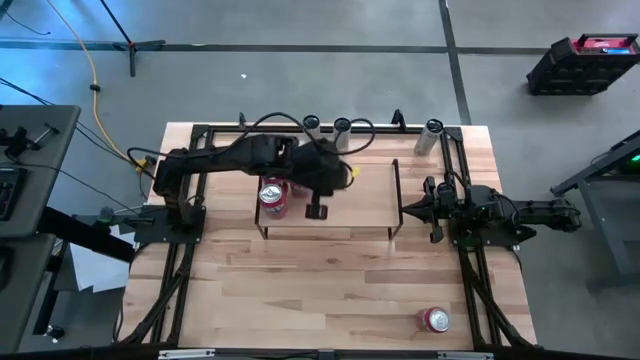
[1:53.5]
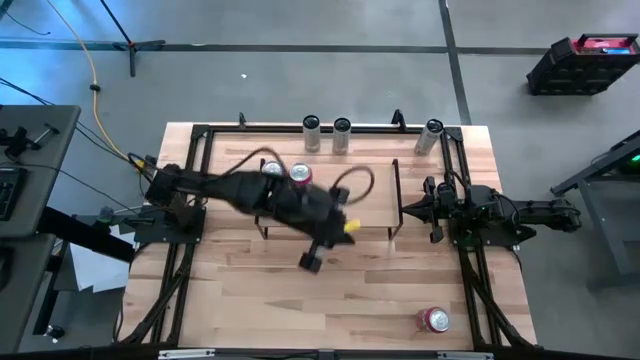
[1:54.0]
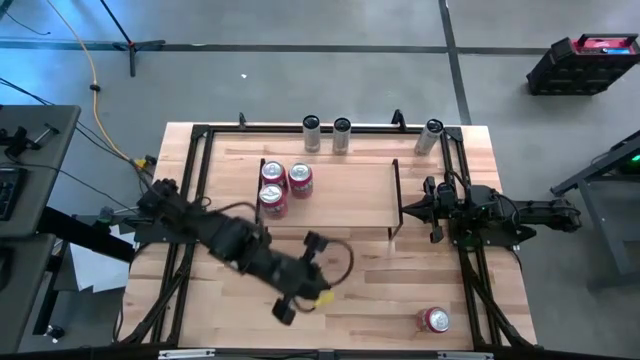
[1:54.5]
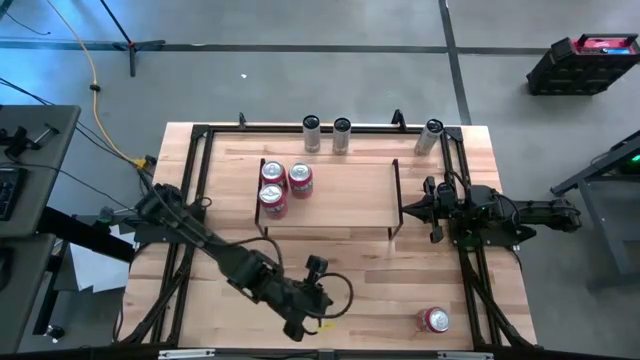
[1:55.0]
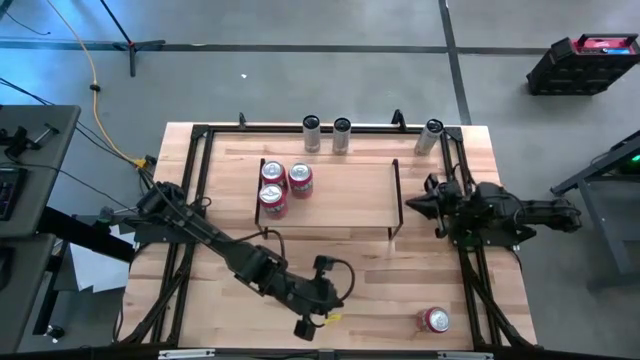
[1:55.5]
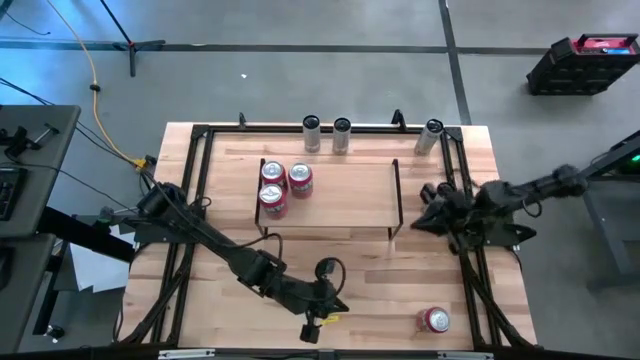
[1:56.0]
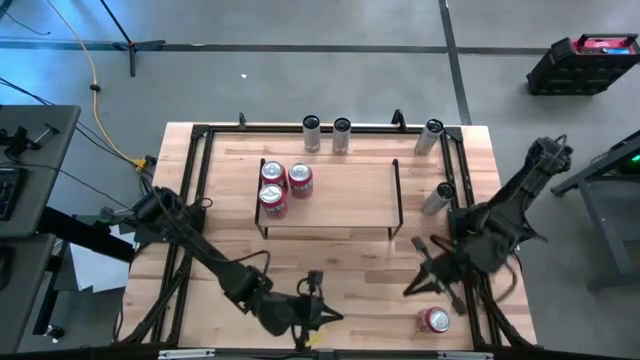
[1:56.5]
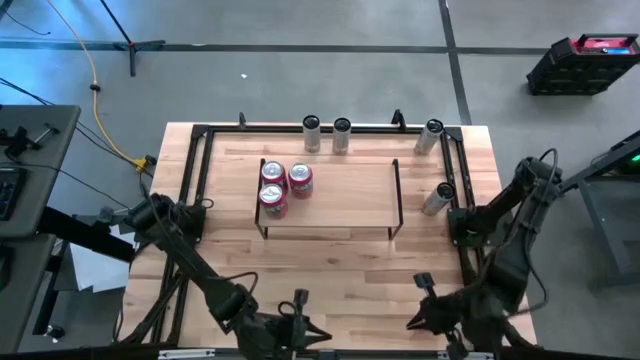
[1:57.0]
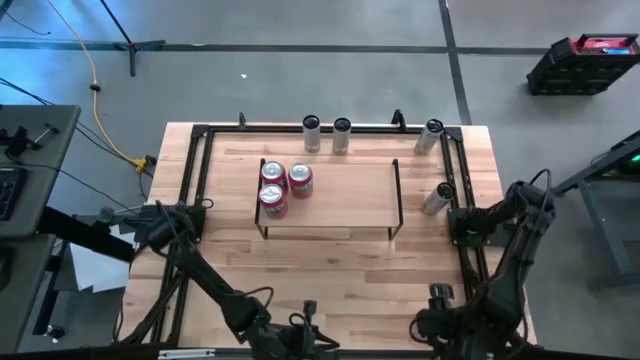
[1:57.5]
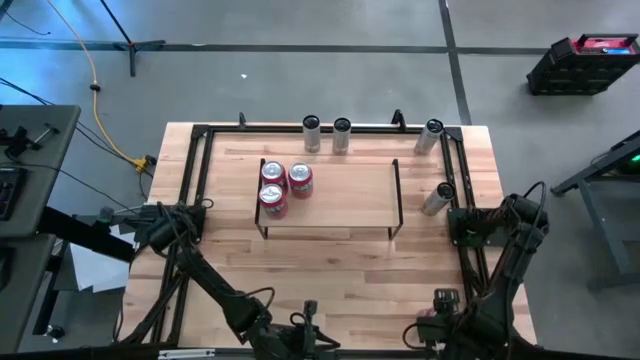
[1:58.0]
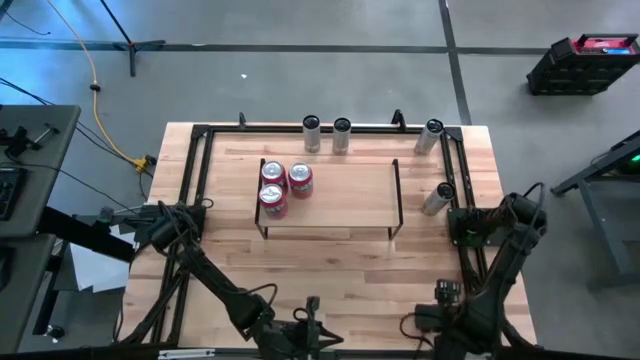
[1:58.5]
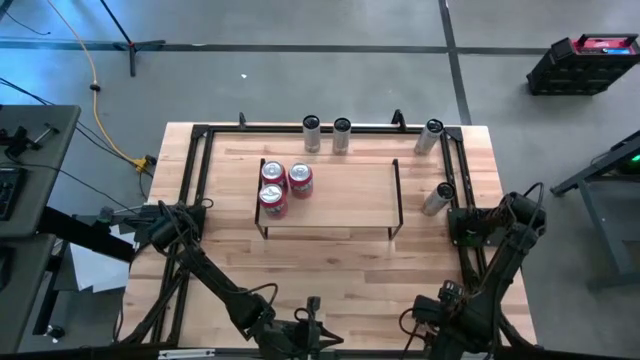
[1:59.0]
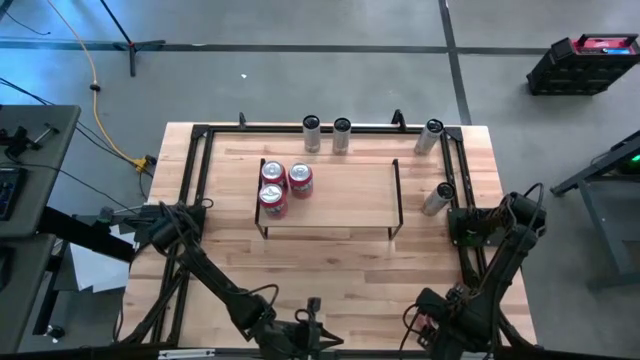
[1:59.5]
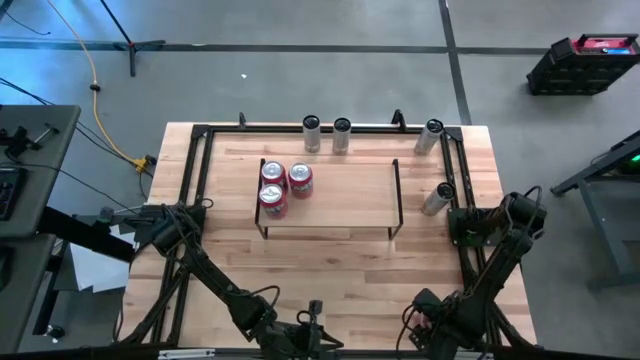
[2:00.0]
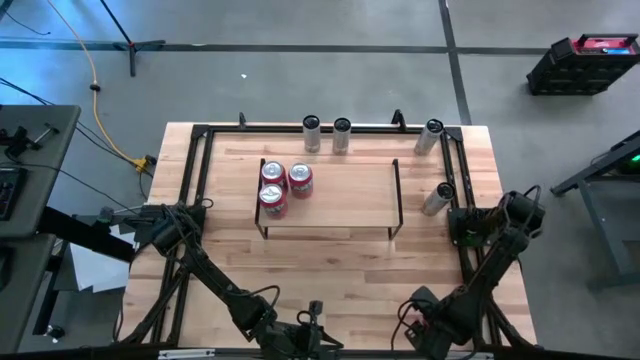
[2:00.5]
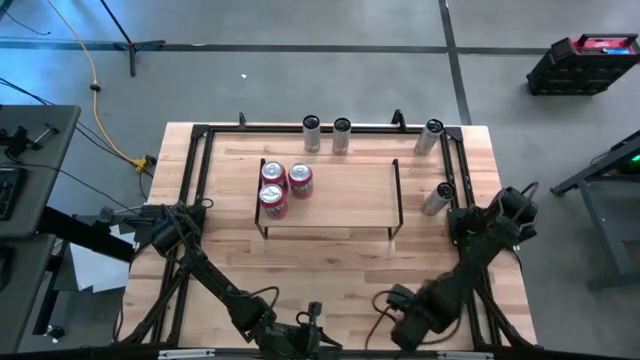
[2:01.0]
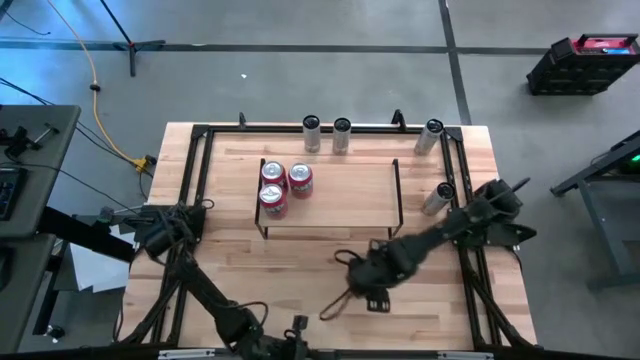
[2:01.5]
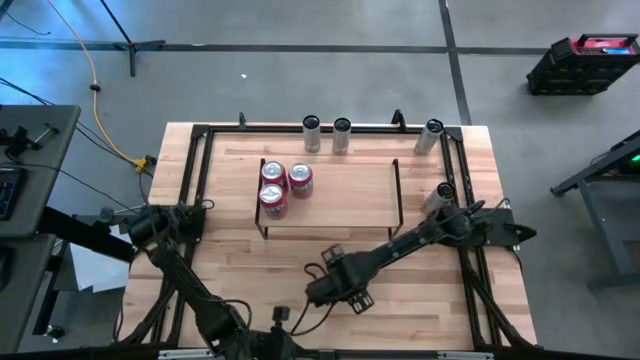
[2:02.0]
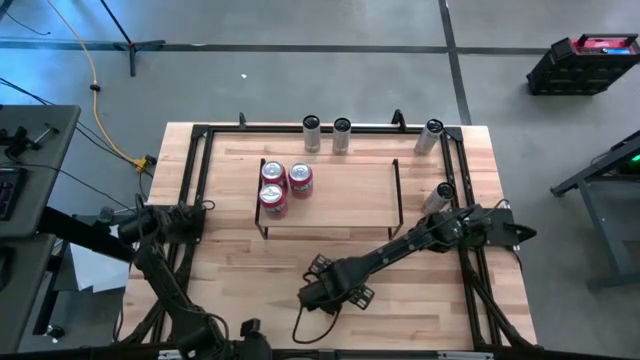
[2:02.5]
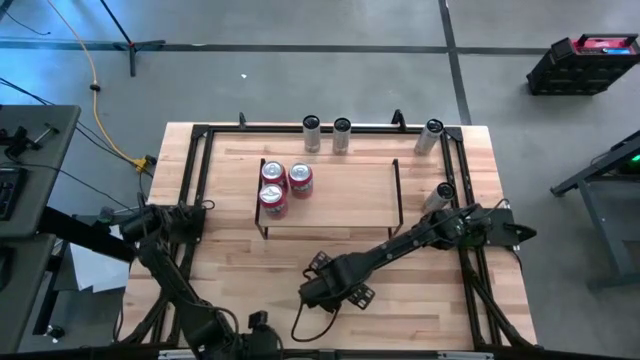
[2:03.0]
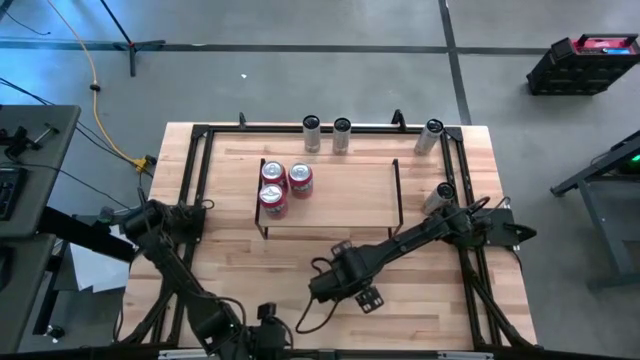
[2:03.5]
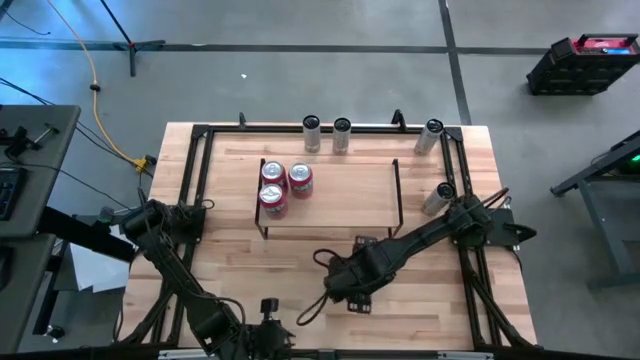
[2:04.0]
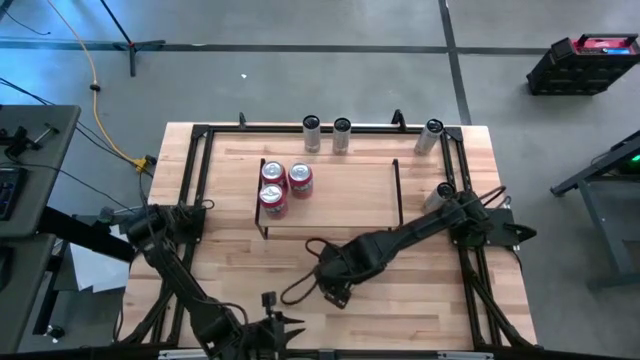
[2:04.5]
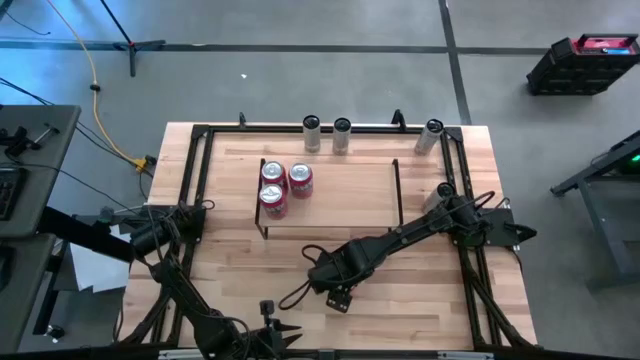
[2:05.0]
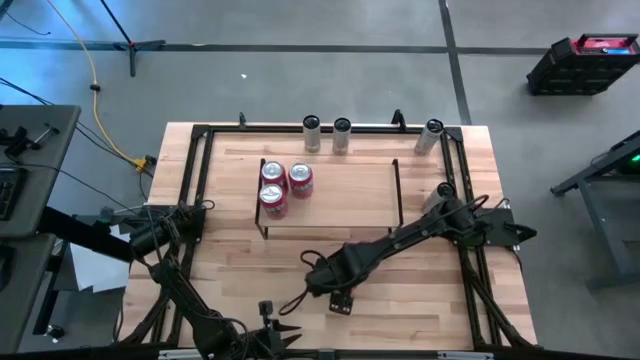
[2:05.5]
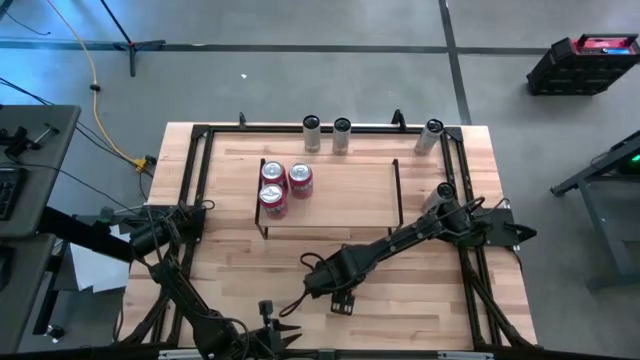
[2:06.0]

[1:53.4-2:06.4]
Task: Place canned beverage on shelf
Put the red soda can on the shelf aligned with the other red soda can

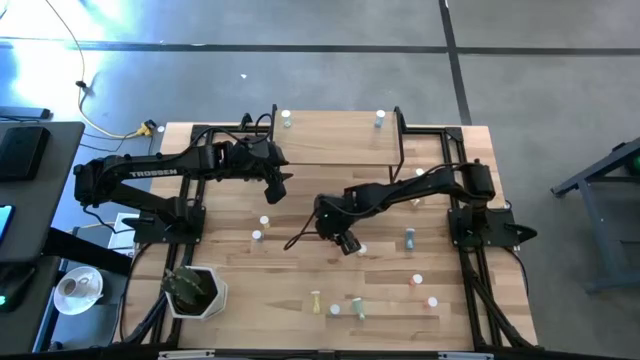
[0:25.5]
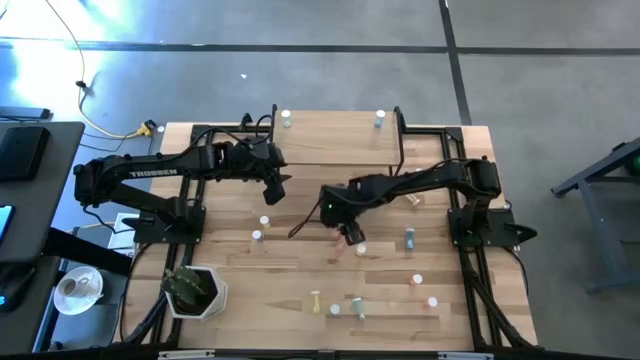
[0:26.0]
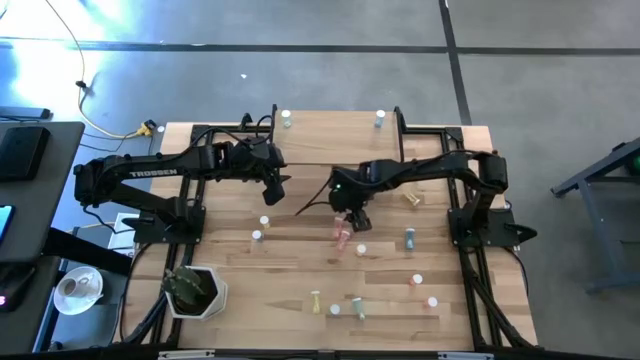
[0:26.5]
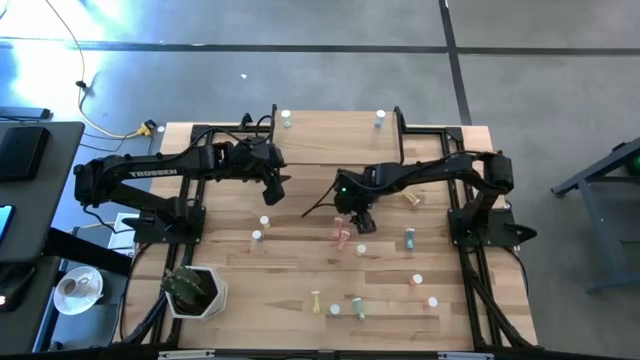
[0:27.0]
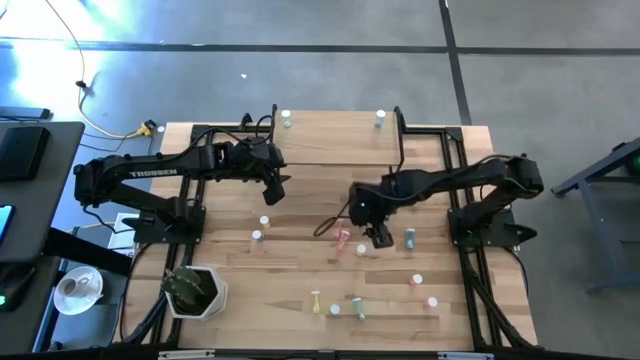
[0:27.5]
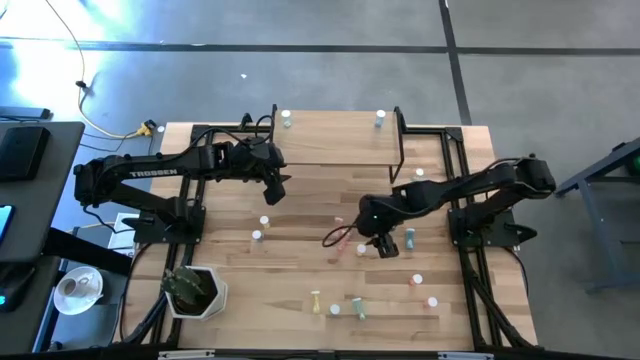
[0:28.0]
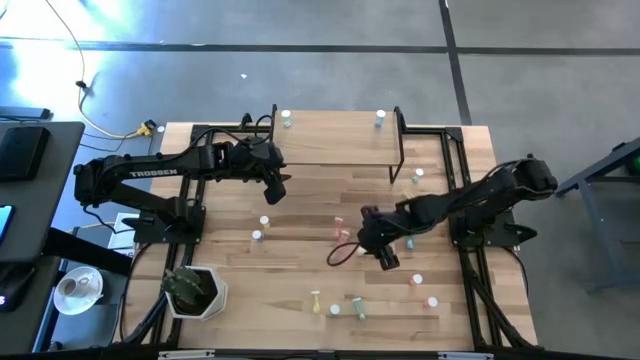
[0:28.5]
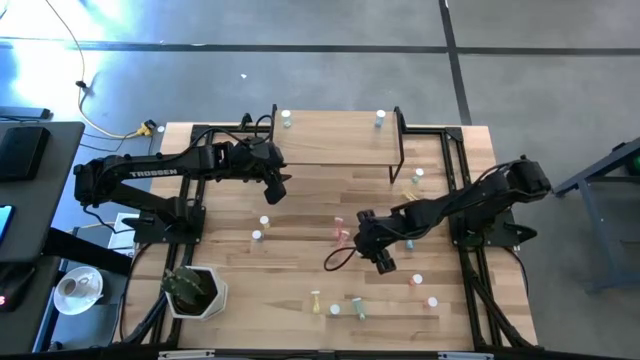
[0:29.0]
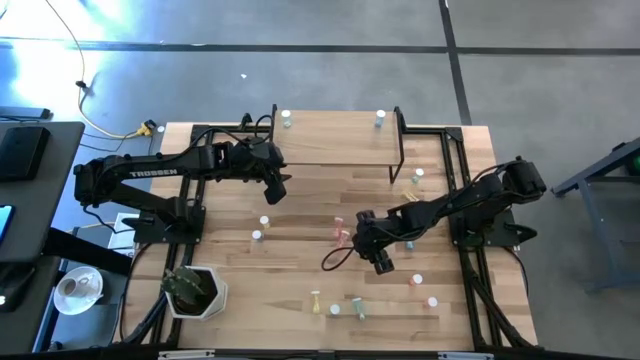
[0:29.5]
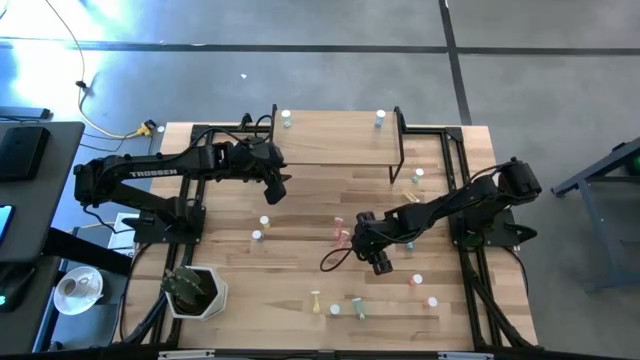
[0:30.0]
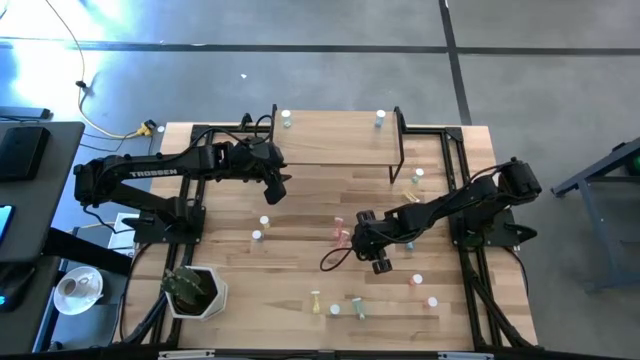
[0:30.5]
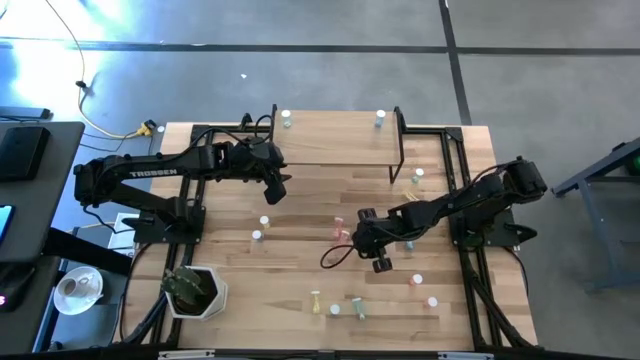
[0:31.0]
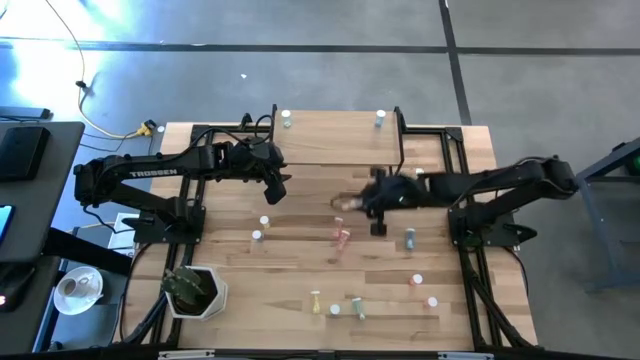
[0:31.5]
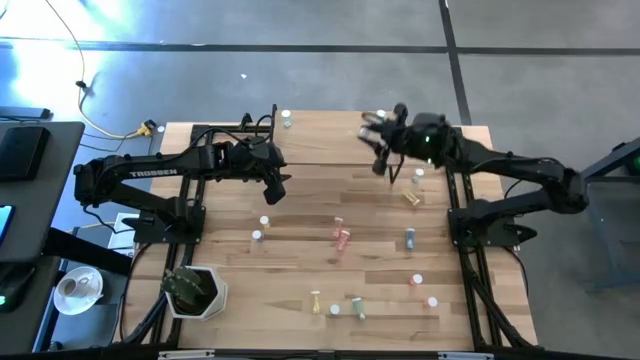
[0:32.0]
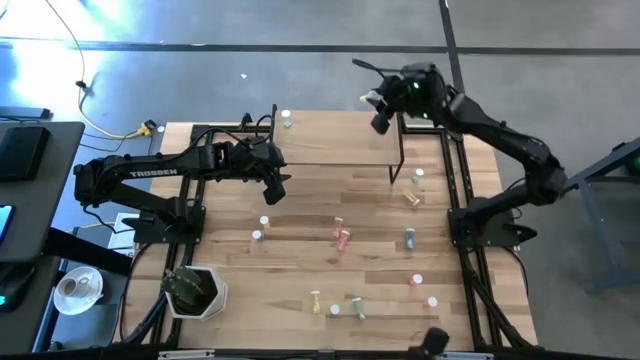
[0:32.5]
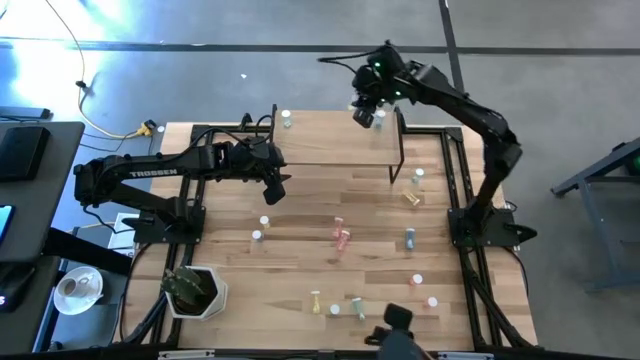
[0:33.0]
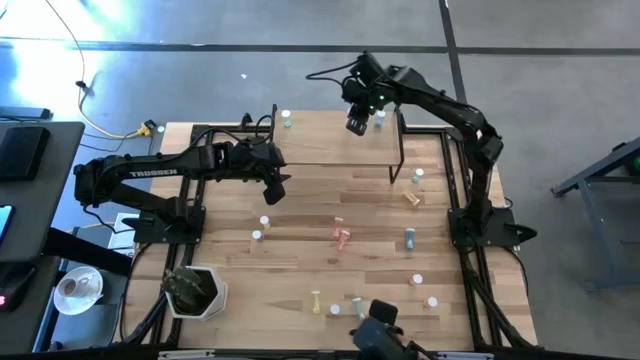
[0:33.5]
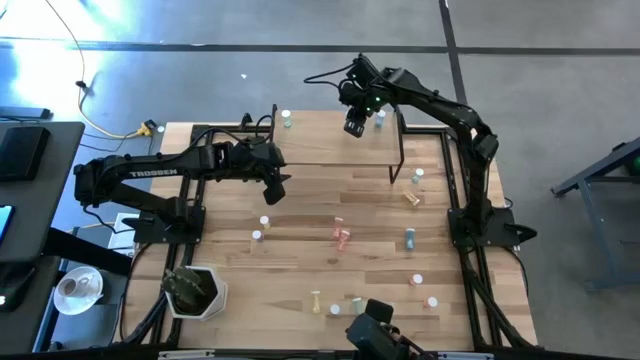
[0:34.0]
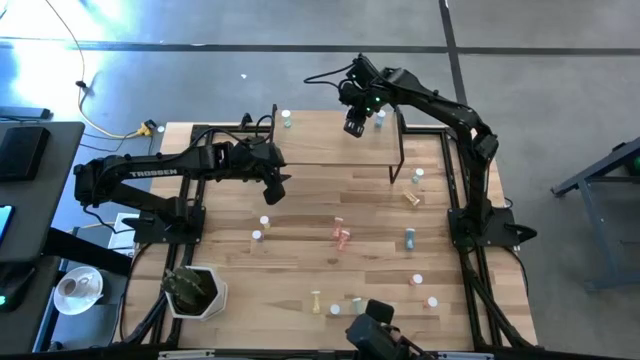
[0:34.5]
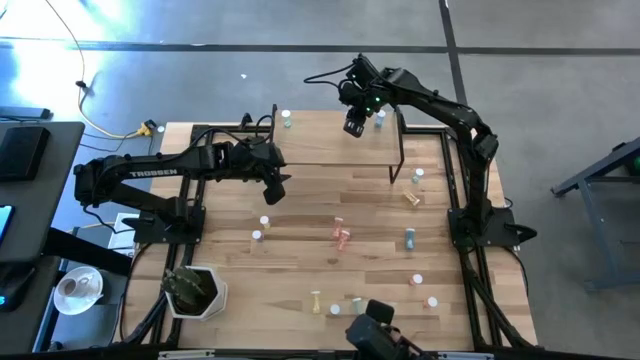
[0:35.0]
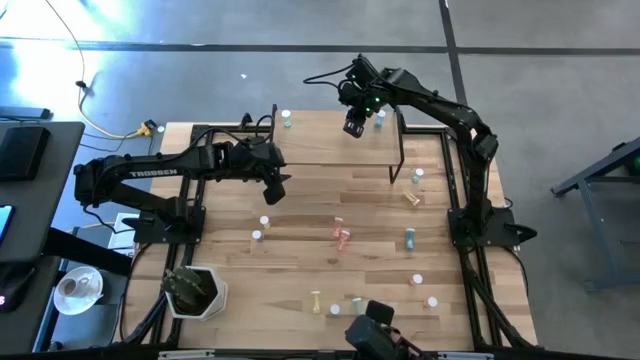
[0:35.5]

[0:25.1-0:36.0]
Task: Pick and place medicine bottles onto shelf by color
Put the yellow pill bottle on the shelf
